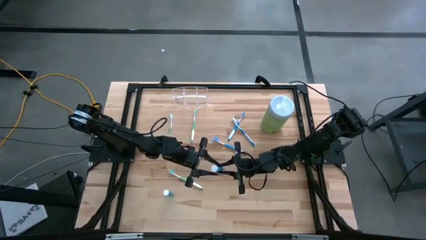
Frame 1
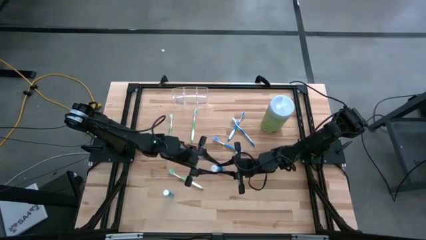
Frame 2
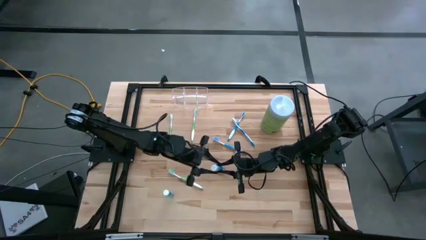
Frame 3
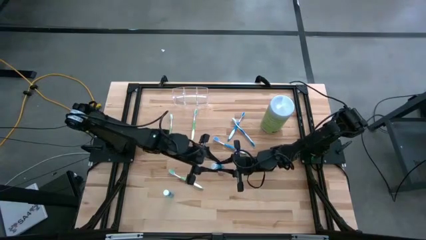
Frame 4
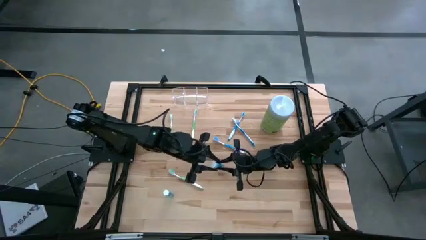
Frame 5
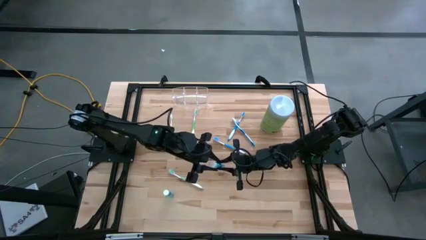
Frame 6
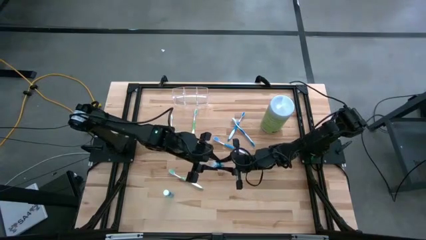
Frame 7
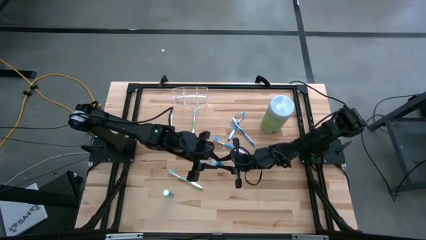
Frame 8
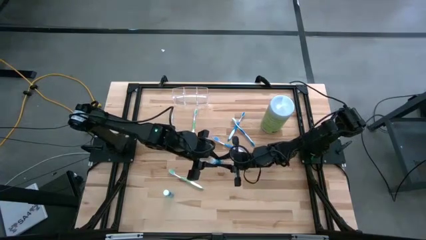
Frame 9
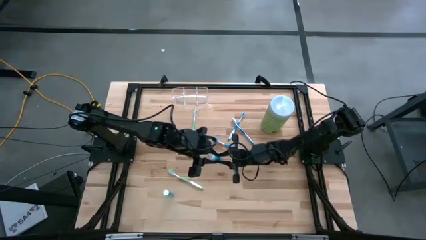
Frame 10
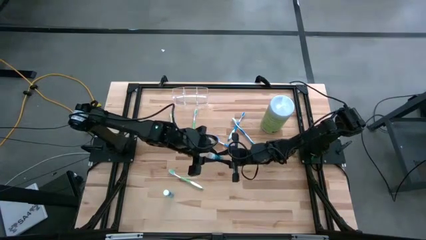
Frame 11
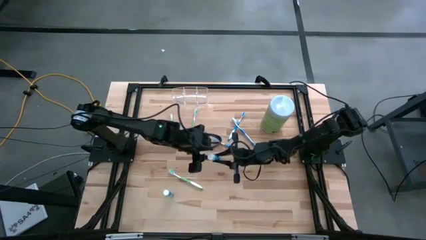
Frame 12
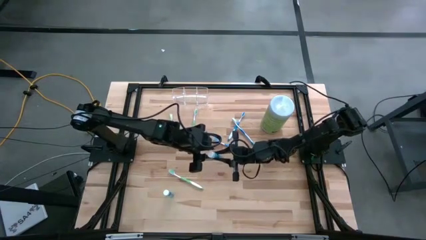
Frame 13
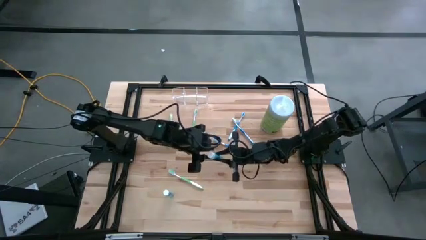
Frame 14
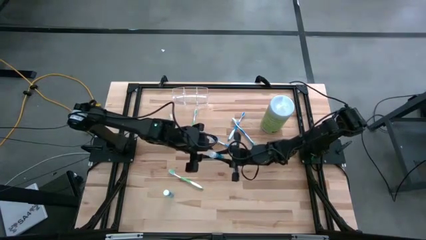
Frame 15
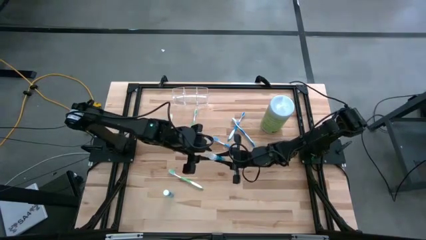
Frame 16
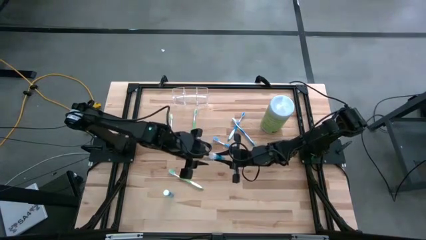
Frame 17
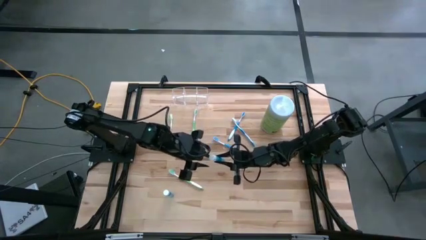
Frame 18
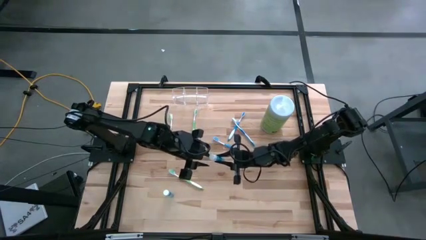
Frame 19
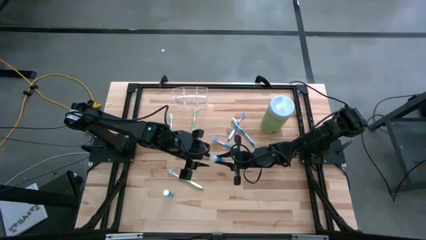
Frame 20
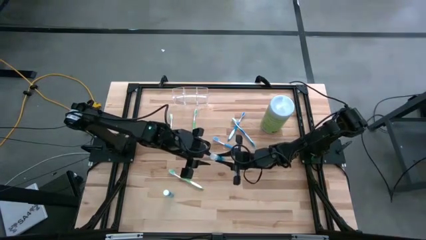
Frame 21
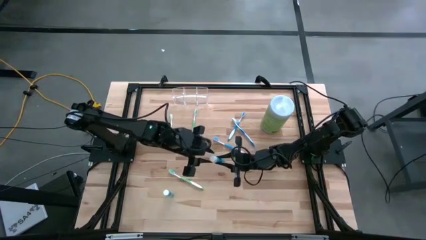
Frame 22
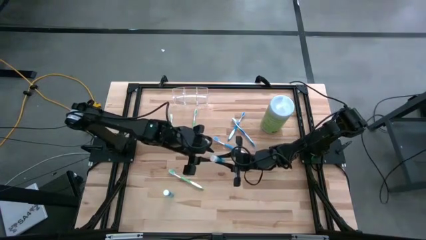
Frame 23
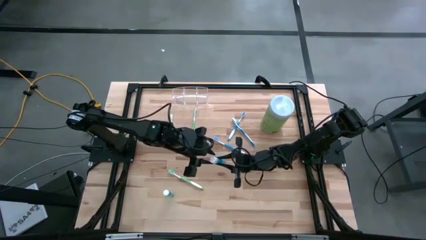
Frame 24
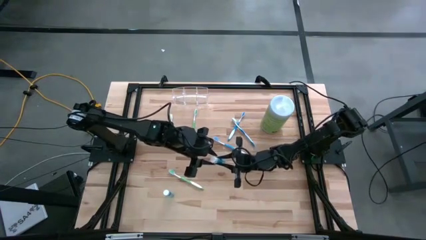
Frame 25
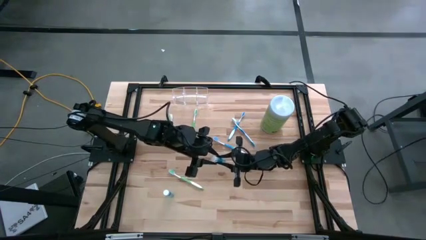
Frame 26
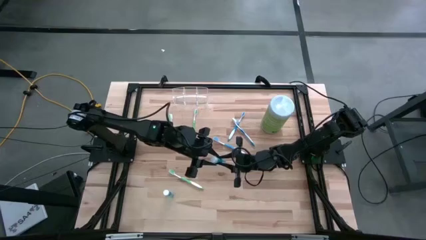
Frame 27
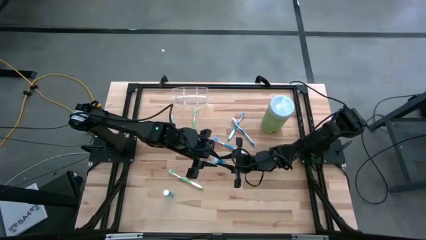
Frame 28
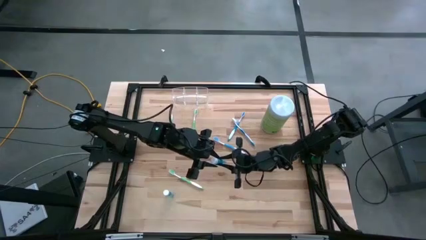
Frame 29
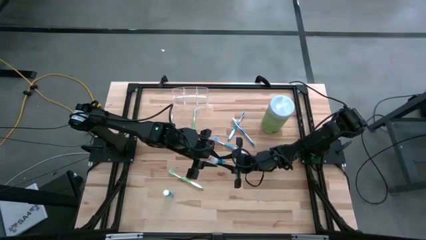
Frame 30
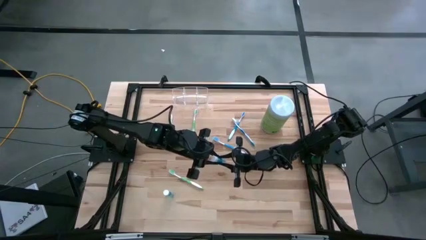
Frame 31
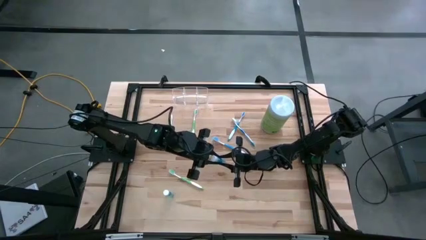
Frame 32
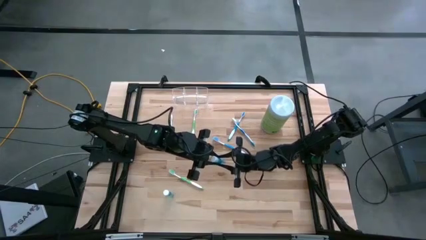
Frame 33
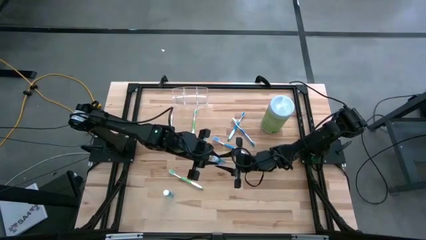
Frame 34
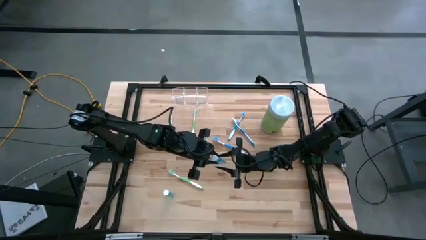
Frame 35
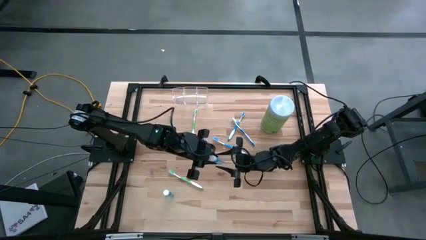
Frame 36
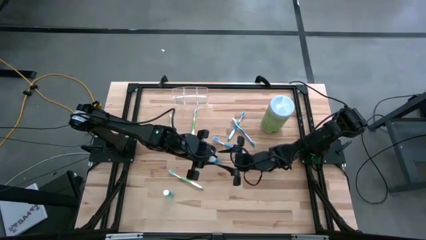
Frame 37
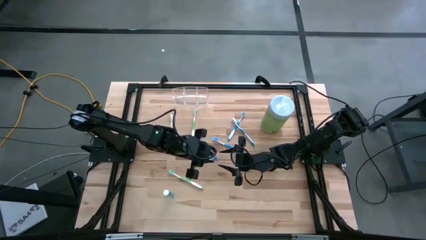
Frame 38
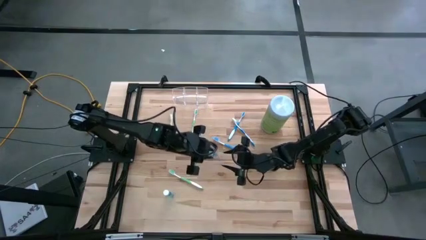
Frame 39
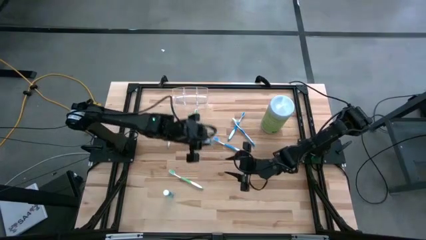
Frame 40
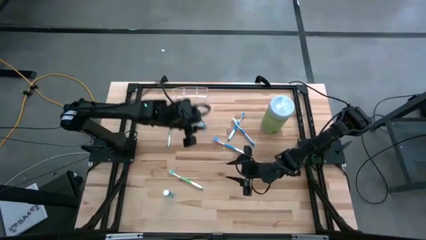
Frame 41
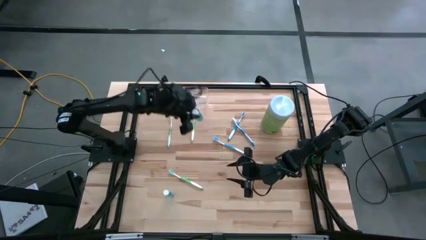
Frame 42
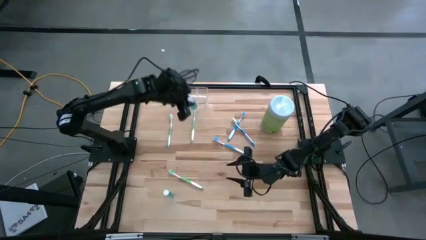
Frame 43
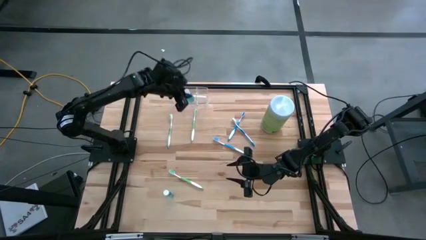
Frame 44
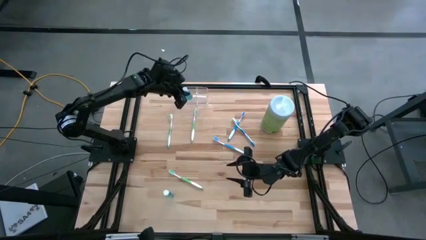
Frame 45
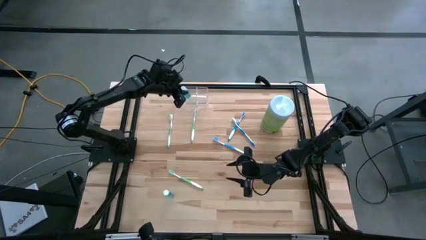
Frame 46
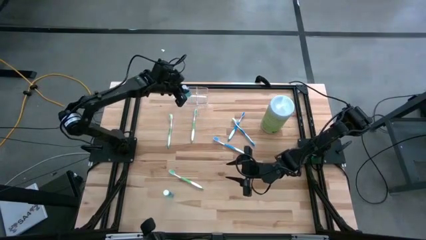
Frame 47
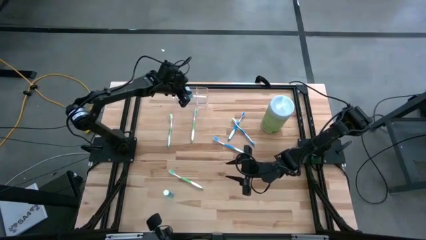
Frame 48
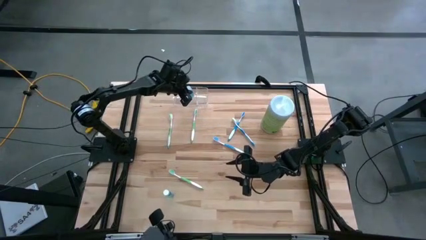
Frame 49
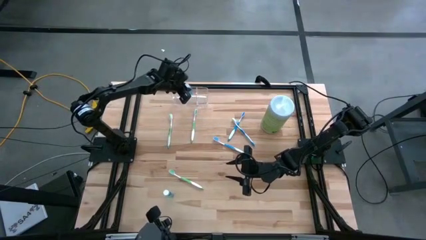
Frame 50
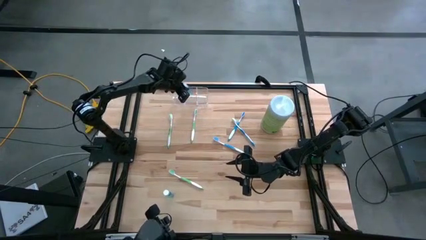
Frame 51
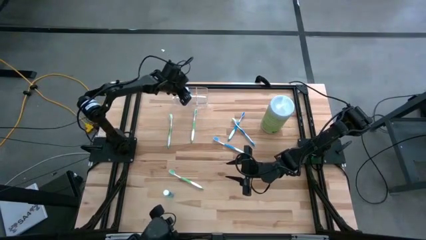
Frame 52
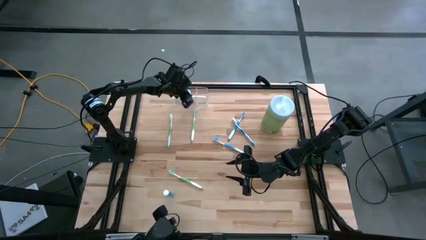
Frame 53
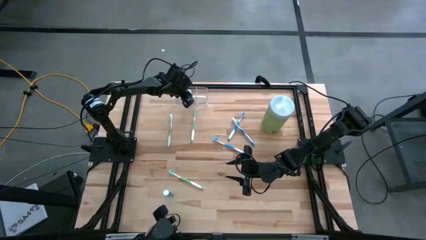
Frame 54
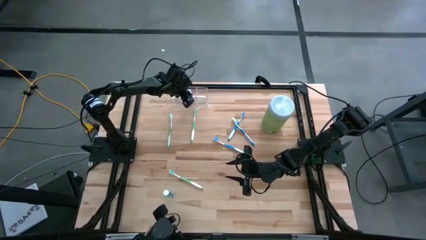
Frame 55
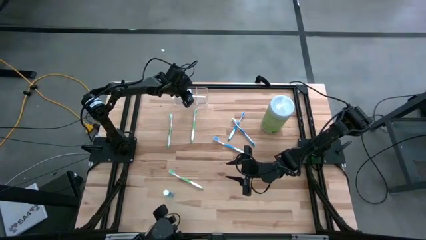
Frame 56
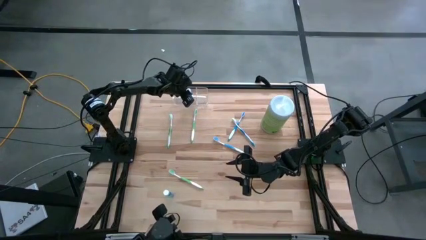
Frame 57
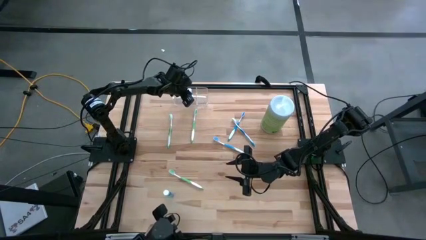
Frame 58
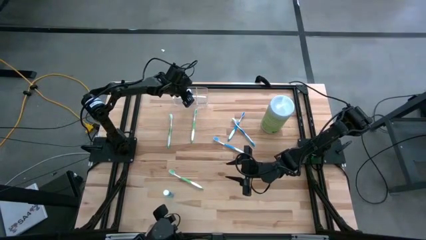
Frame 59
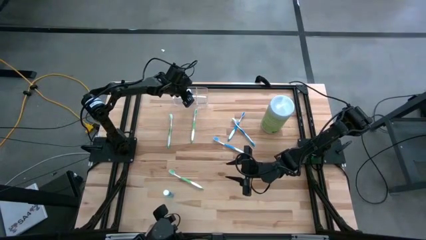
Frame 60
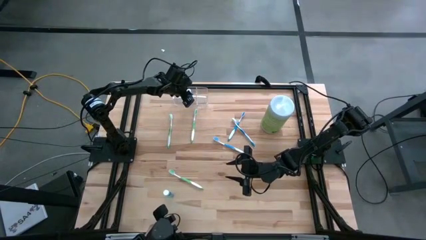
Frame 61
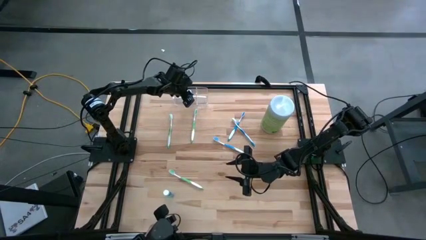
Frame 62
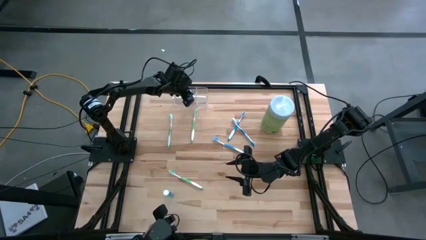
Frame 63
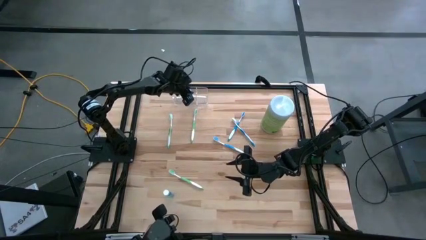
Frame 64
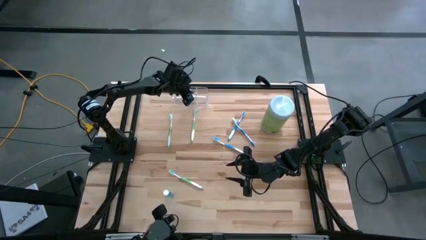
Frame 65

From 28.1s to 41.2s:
Task: Pick & Place toothbrushing station
Put the top blue mouthwash into the middle section of the transparent organizer
